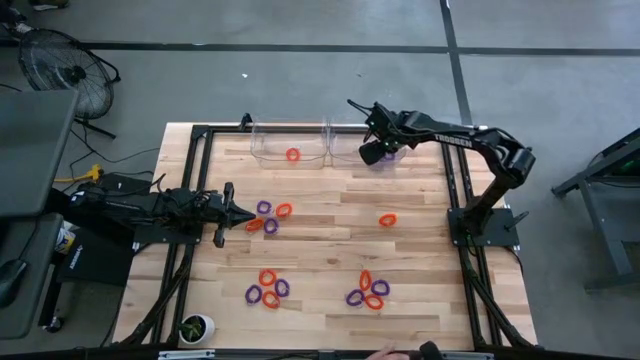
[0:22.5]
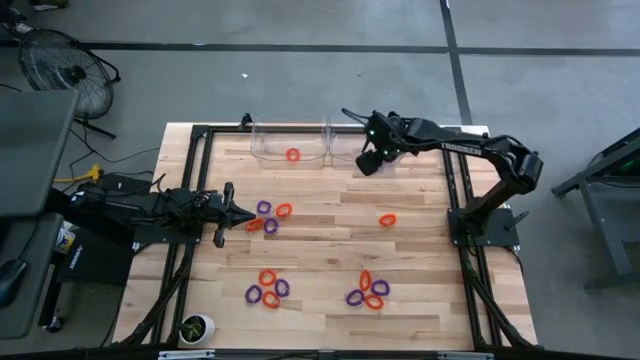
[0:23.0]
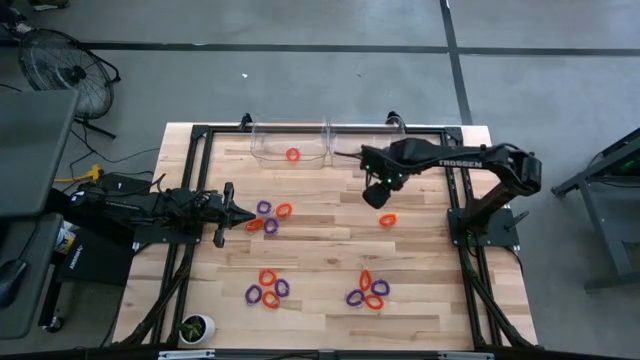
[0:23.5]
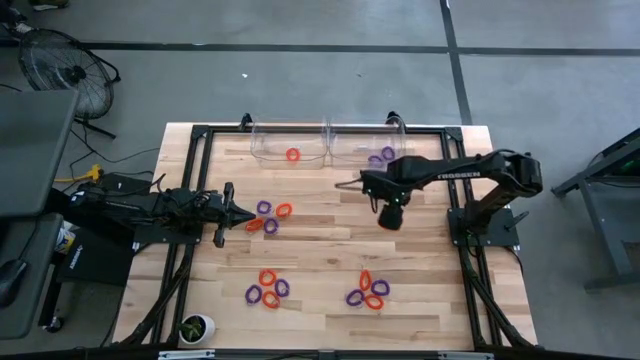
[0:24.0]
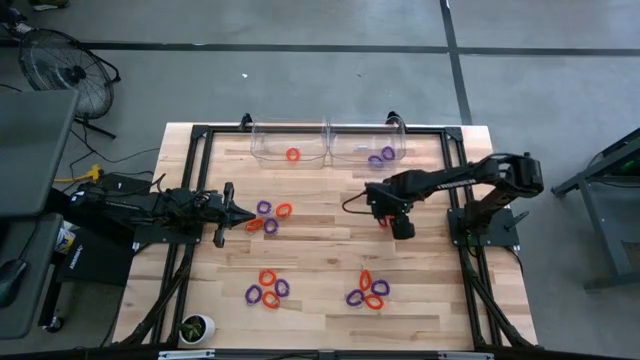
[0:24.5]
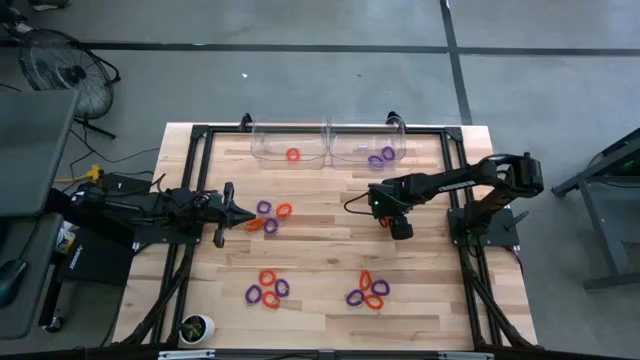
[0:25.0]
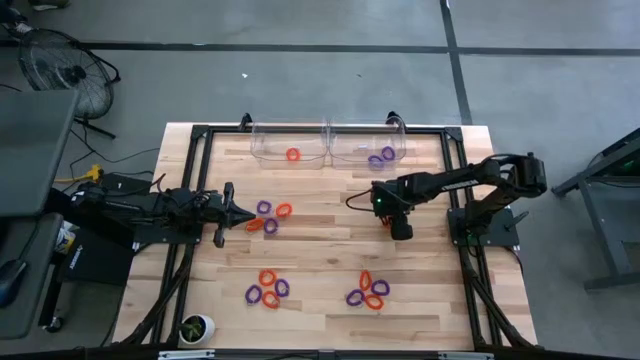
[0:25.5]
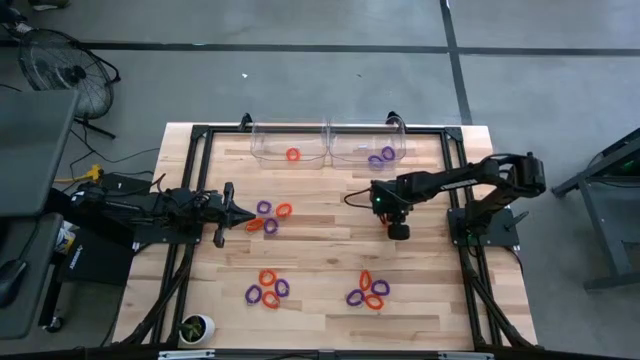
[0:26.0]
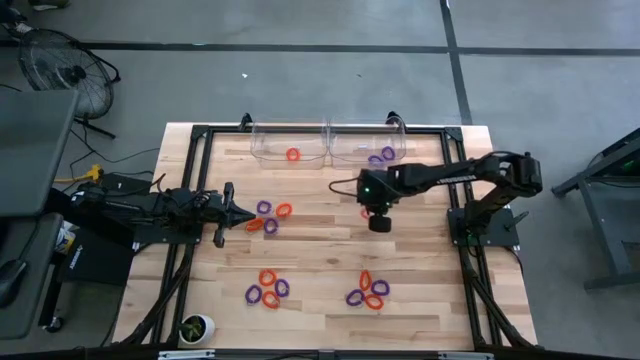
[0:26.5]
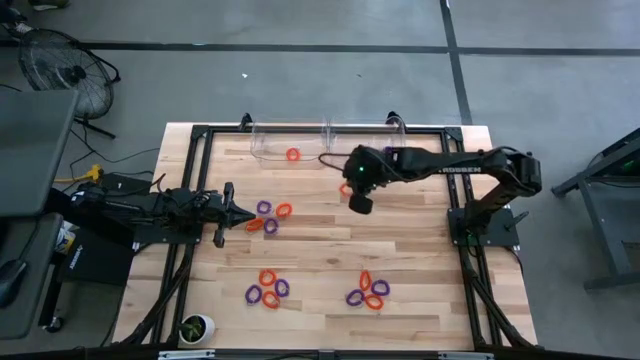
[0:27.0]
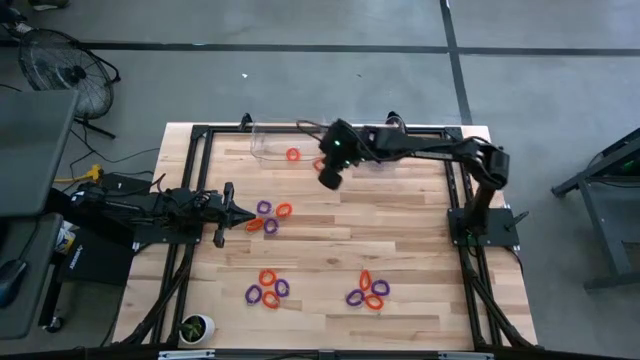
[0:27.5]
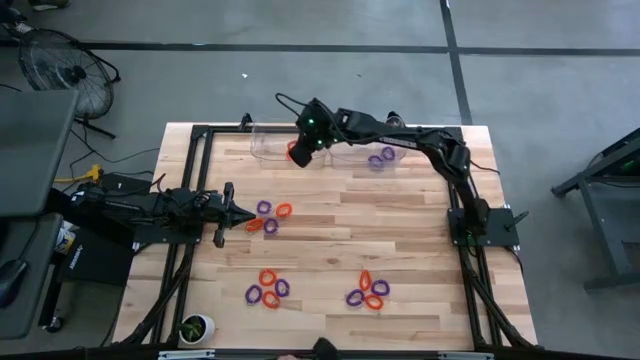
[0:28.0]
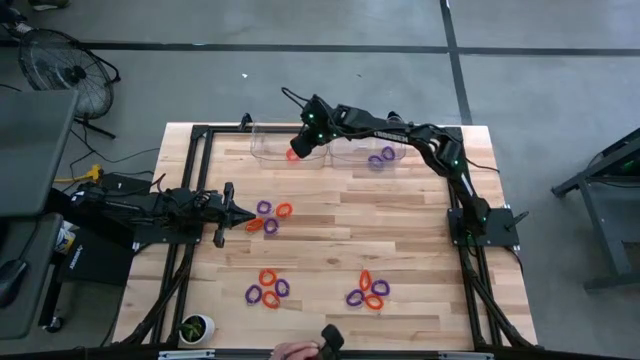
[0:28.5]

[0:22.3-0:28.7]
Task: Sort spring keychains
Put the orange spring keychain into the left transparent bin

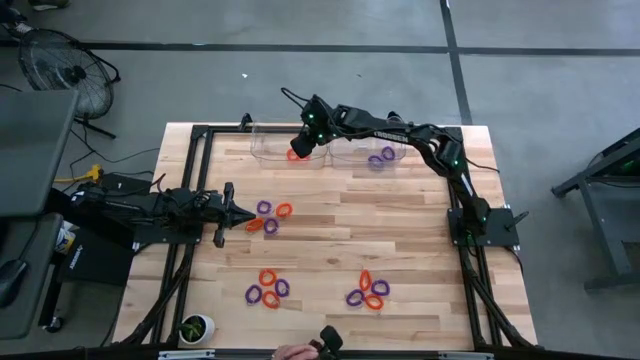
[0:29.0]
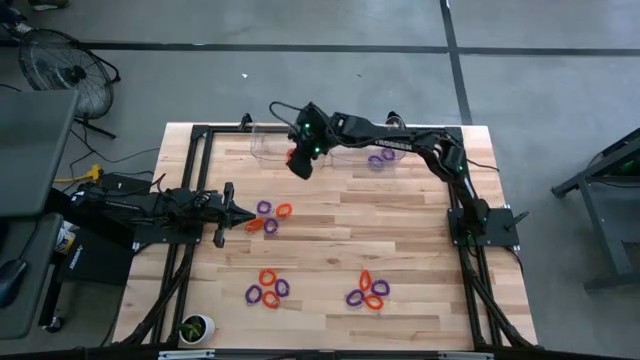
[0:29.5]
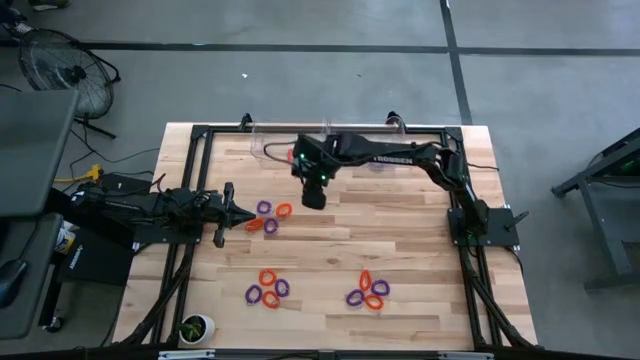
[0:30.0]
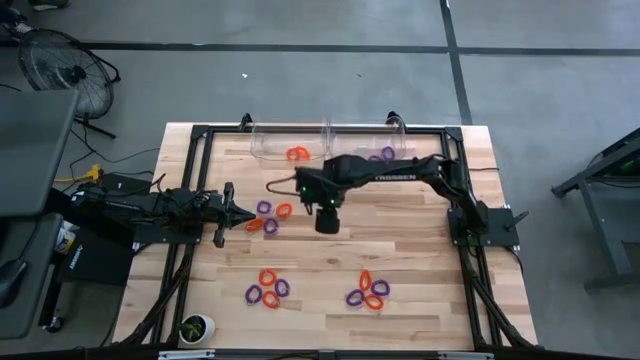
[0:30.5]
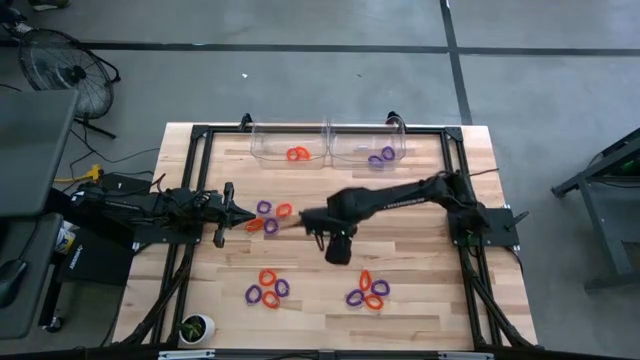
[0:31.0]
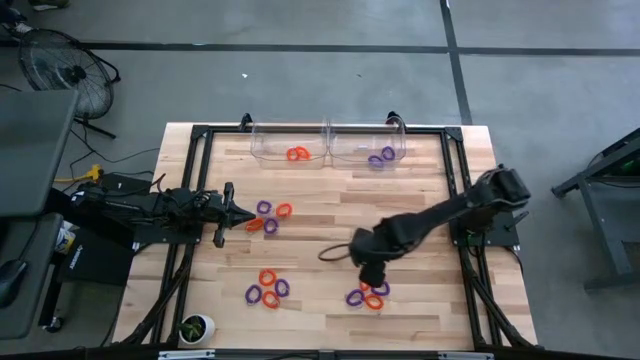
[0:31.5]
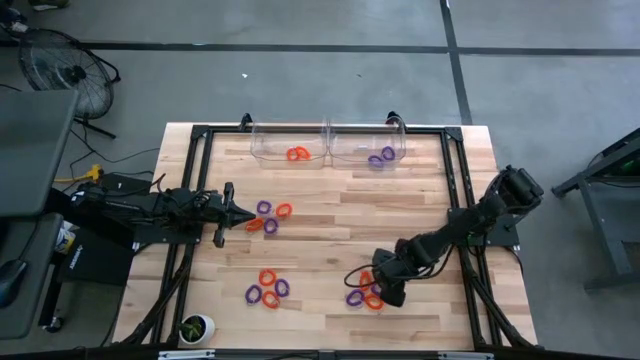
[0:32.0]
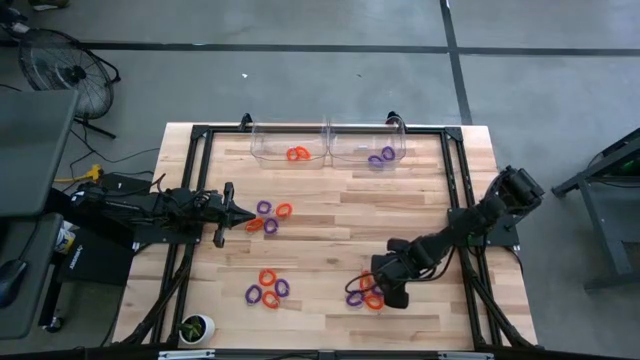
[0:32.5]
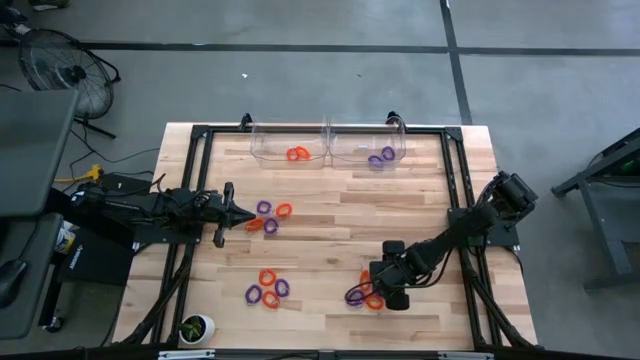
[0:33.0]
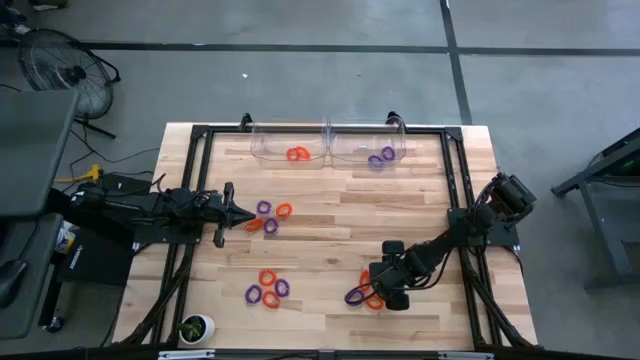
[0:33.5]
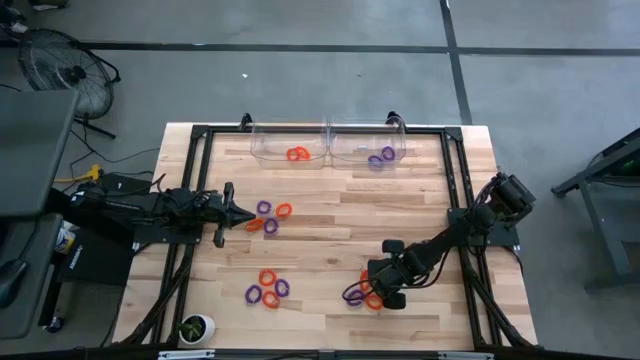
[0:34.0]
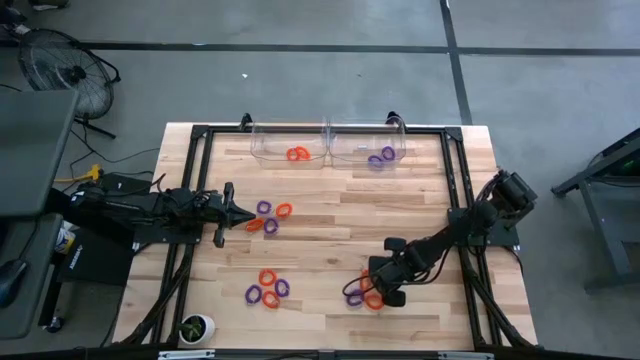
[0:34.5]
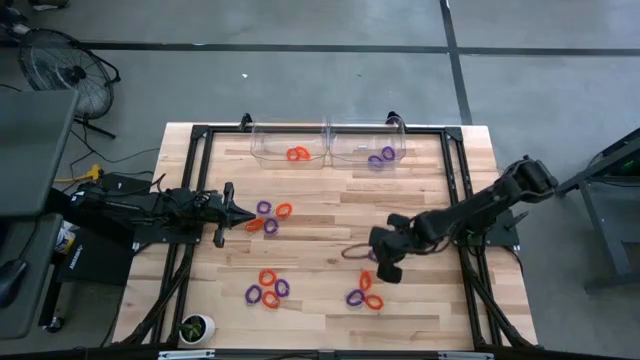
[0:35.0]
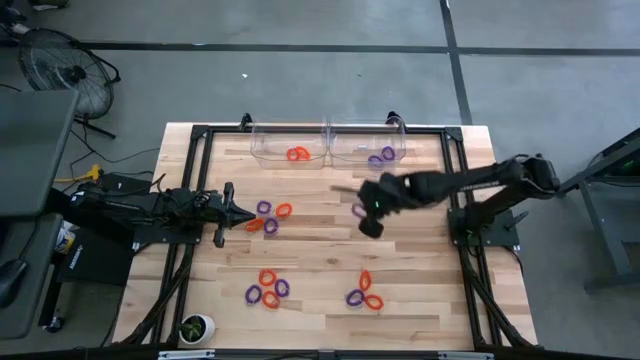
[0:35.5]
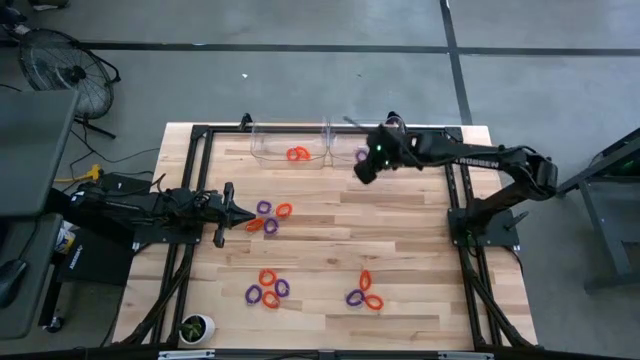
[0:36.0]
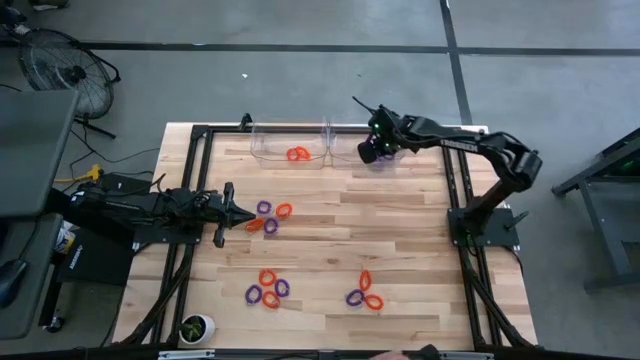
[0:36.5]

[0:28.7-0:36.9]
Put the violet spring keychain into the right transparent bin

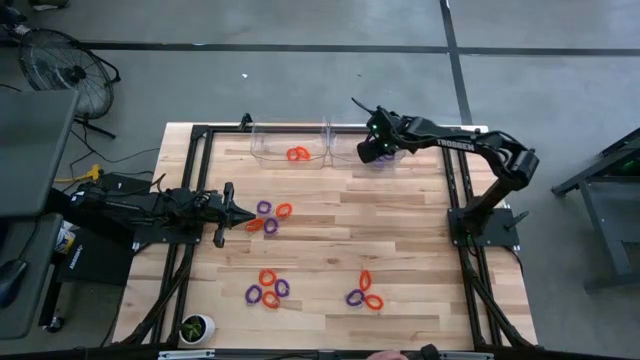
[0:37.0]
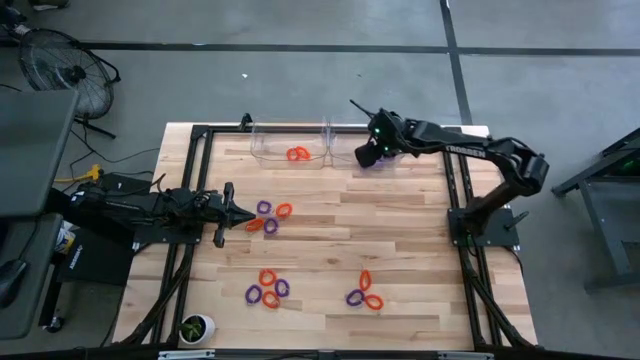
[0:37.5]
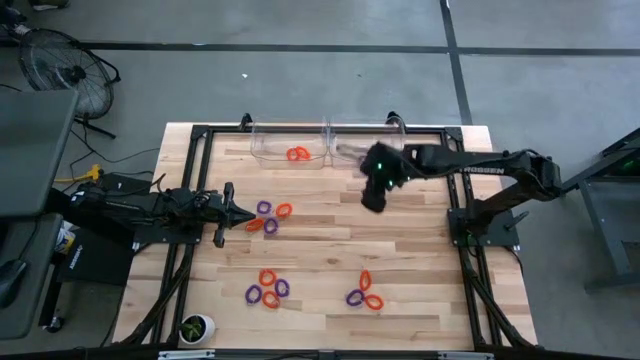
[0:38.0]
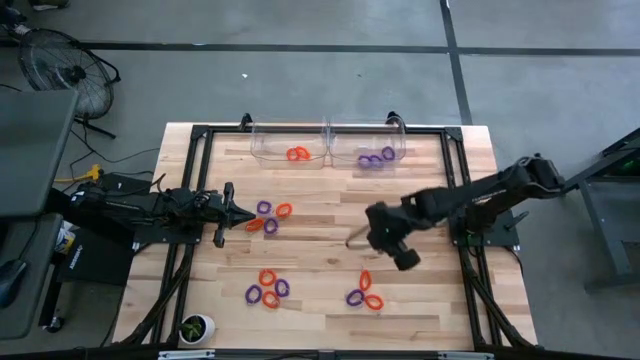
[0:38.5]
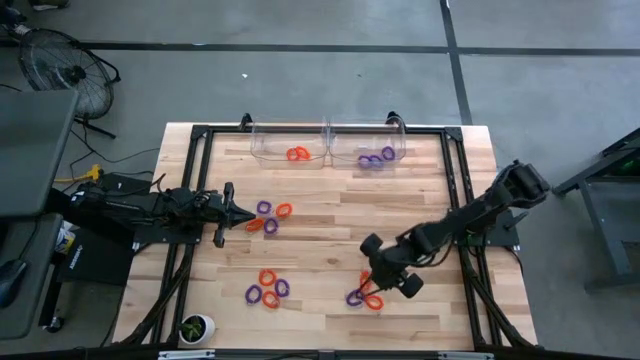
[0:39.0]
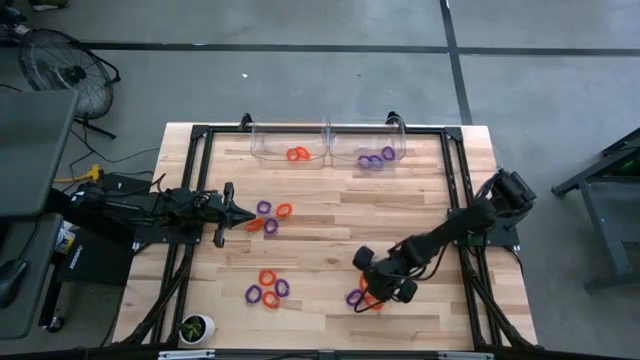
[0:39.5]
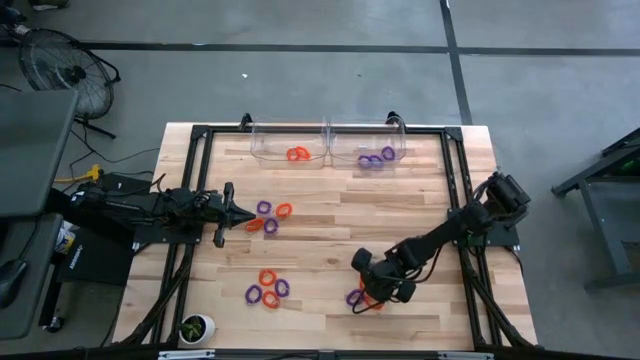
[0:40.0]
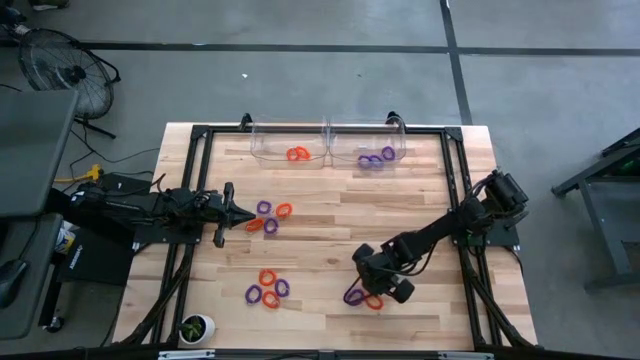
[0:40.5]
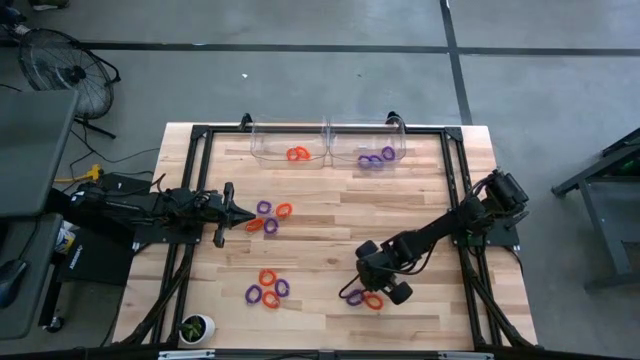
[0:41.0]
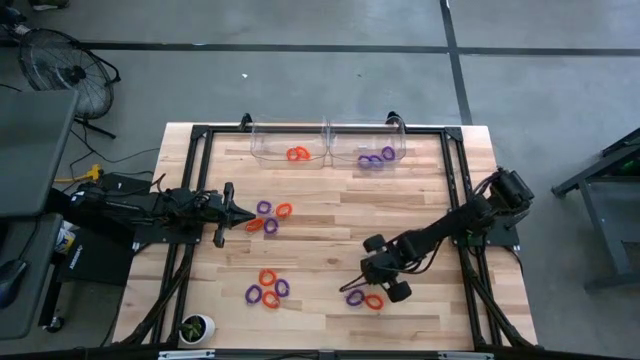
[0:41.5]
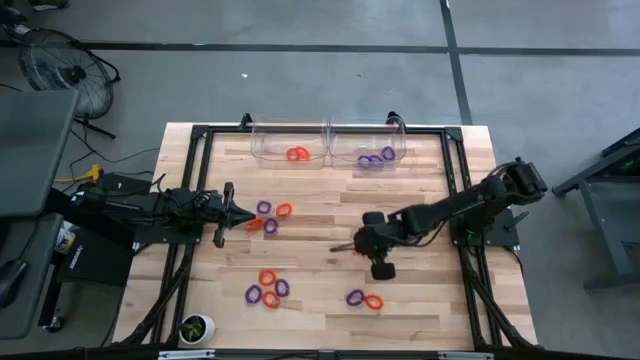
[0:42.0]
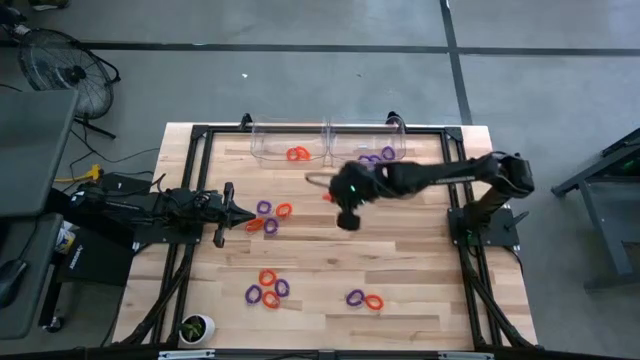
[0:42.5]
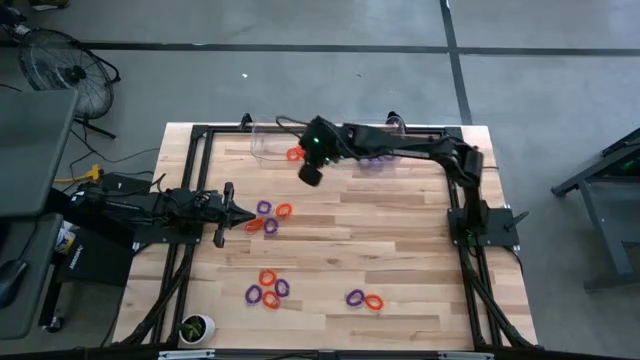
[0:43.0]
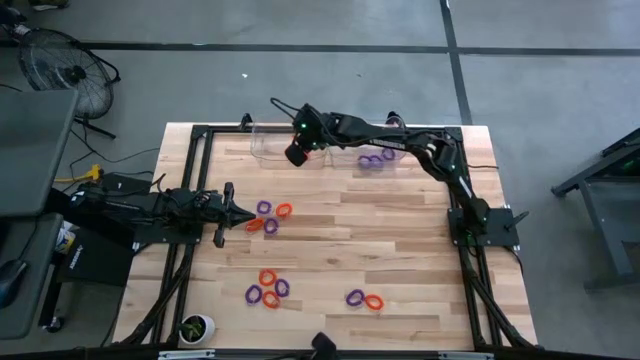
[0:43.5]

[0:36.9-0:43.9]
Put the orange spring keychain into the left transparent bin

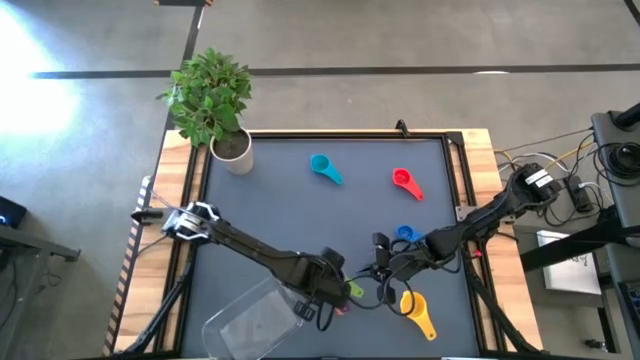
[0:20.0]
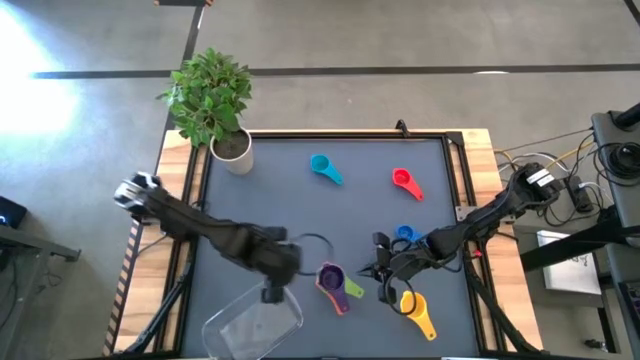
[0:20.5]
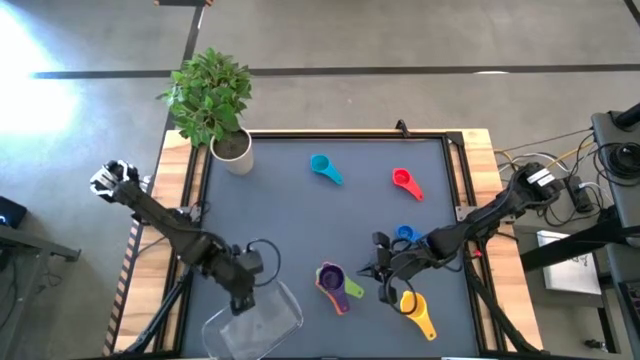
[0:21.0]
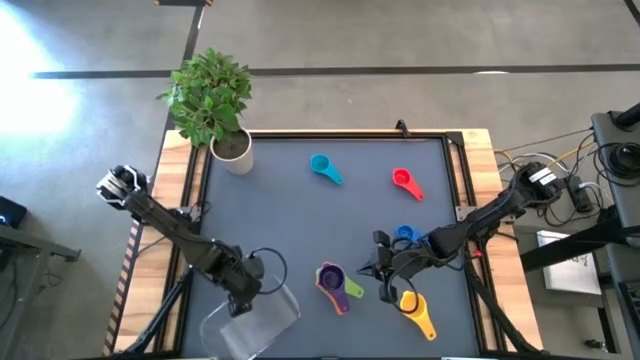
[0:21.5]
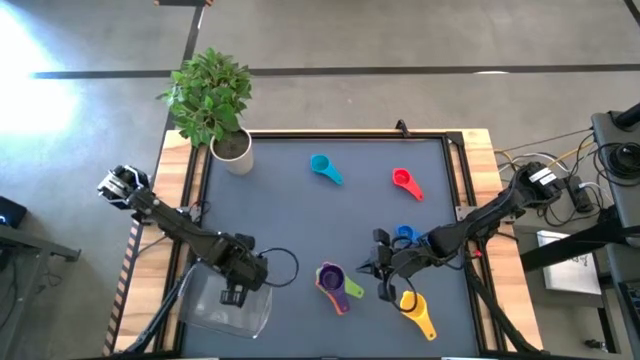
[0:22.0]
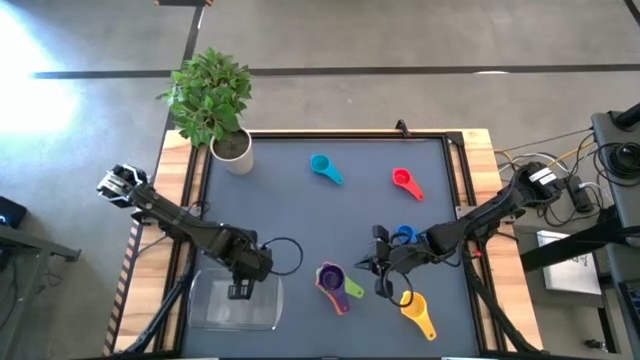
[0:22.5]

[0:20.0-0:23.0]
Task: Nest measuring cups in basket
Adjust the transparent bin
